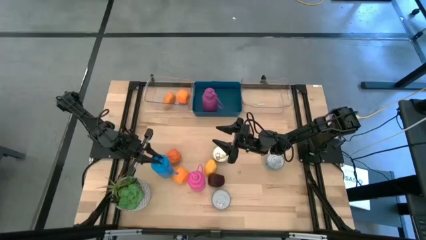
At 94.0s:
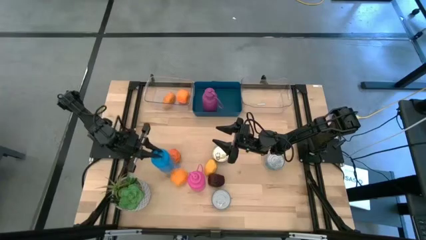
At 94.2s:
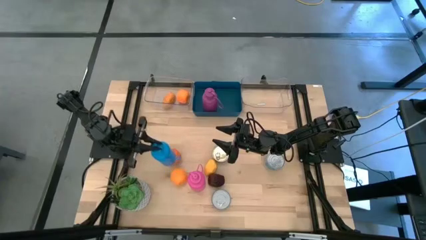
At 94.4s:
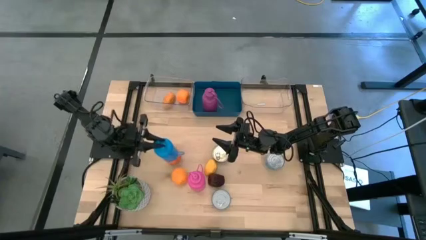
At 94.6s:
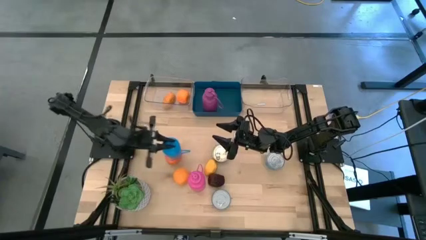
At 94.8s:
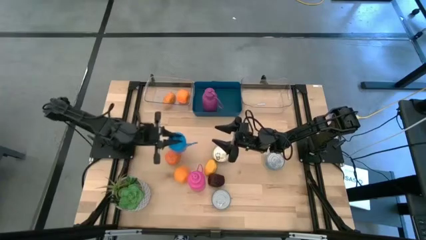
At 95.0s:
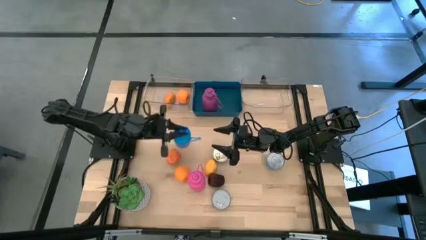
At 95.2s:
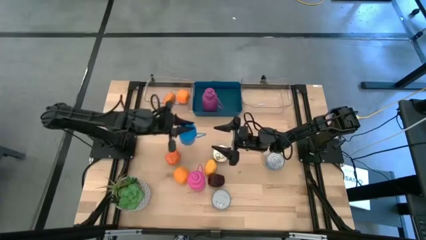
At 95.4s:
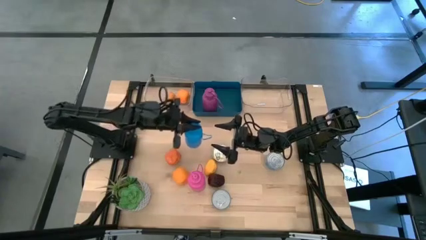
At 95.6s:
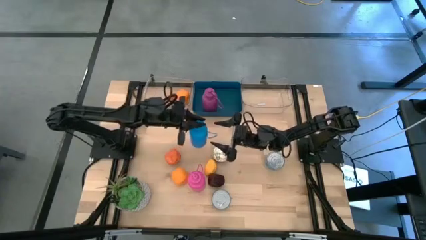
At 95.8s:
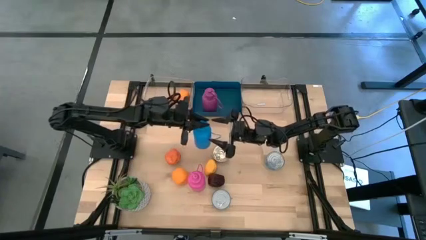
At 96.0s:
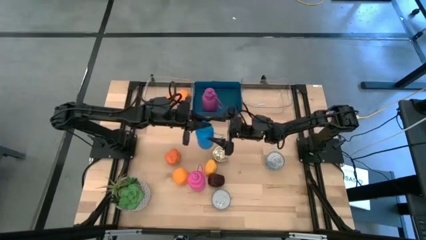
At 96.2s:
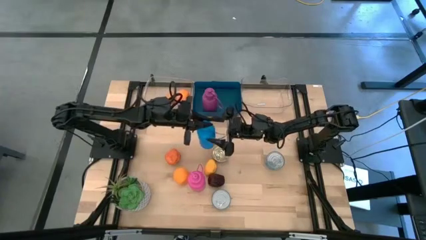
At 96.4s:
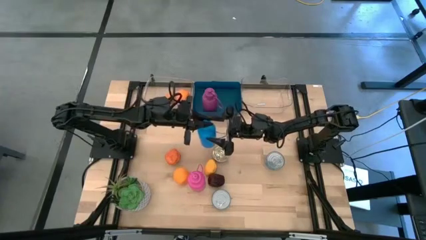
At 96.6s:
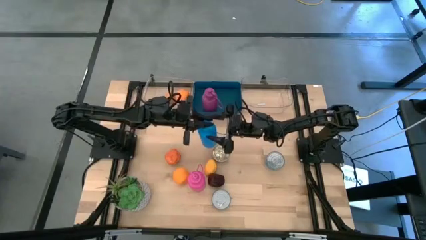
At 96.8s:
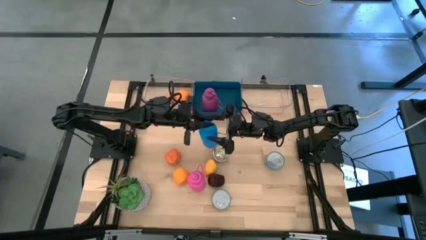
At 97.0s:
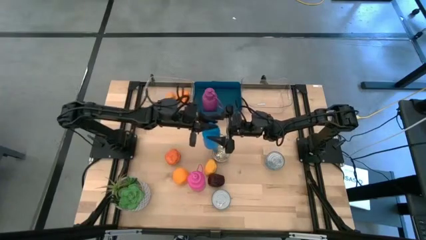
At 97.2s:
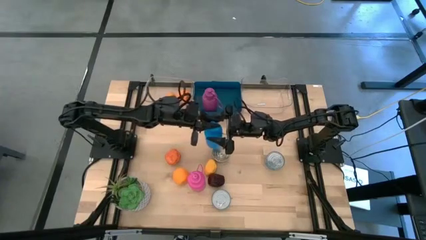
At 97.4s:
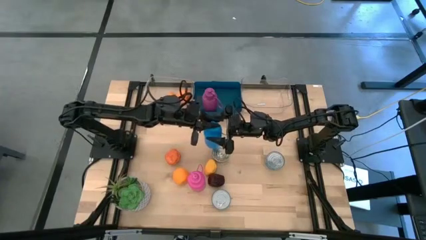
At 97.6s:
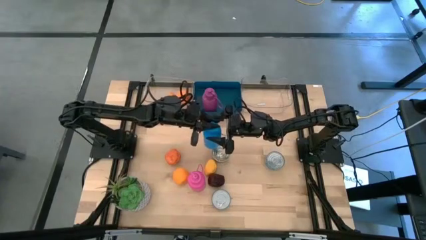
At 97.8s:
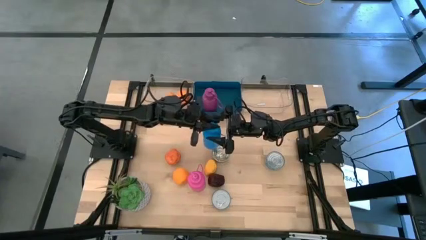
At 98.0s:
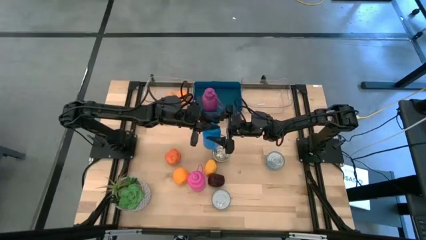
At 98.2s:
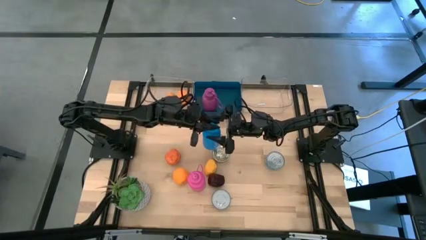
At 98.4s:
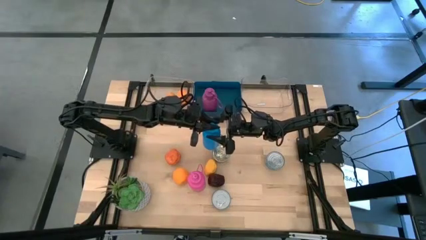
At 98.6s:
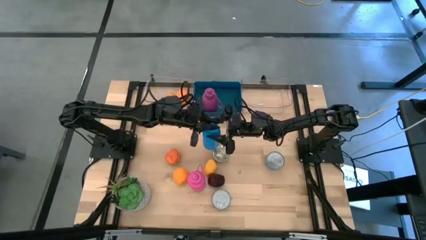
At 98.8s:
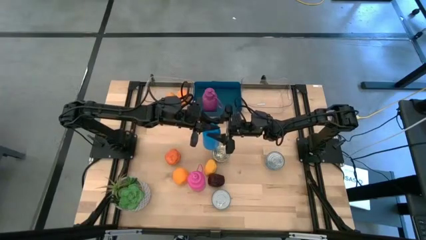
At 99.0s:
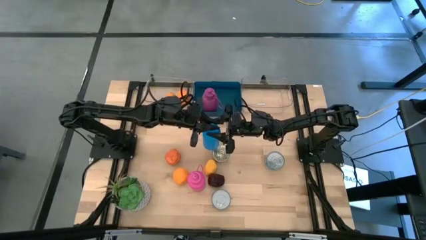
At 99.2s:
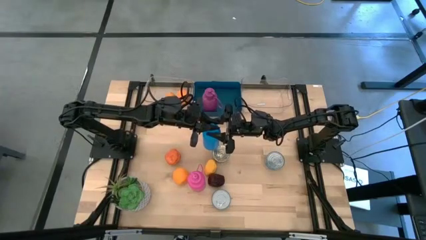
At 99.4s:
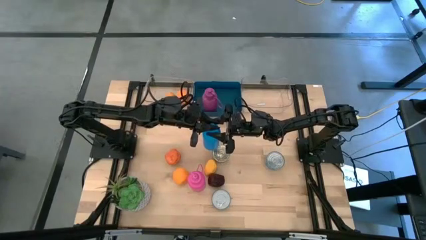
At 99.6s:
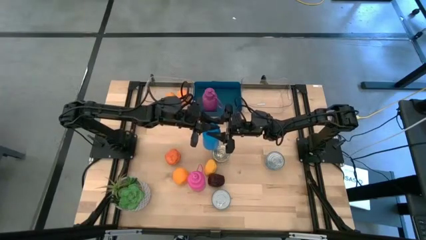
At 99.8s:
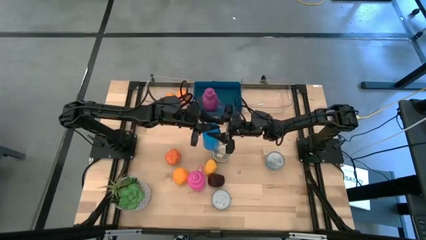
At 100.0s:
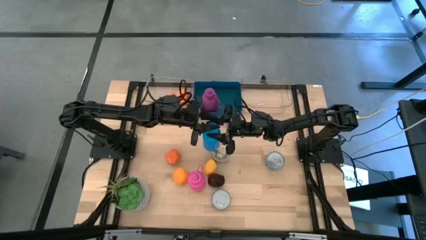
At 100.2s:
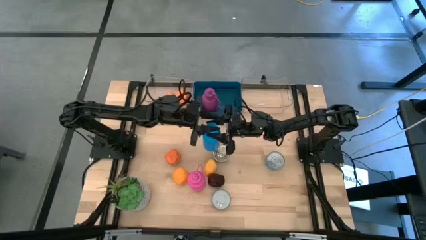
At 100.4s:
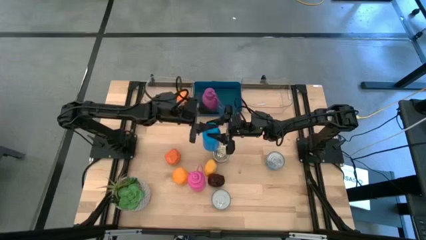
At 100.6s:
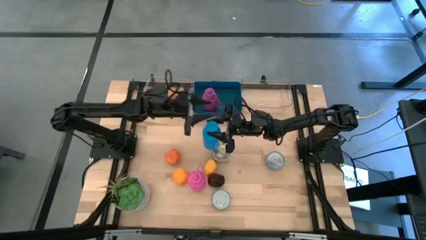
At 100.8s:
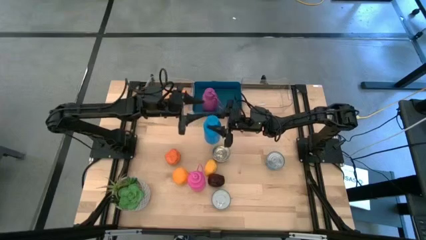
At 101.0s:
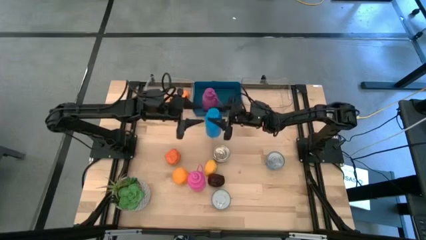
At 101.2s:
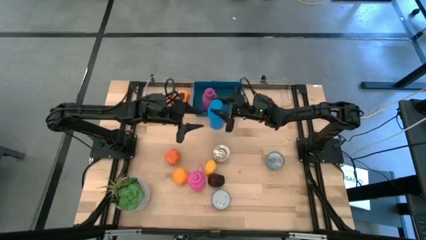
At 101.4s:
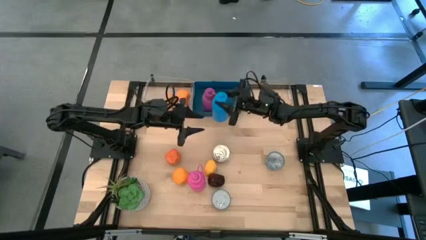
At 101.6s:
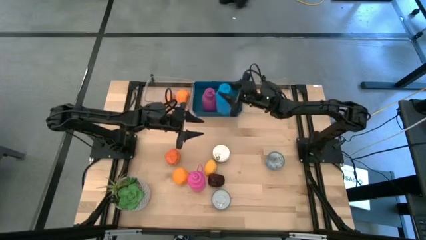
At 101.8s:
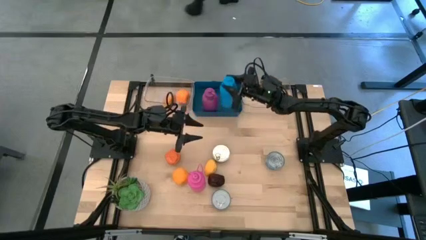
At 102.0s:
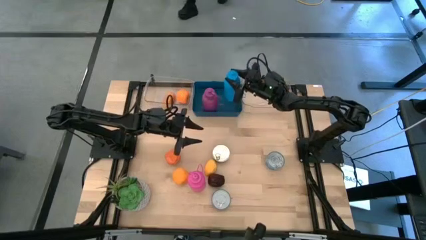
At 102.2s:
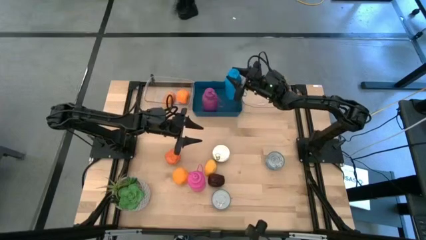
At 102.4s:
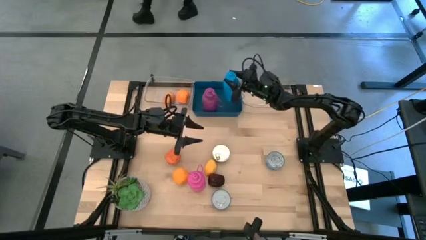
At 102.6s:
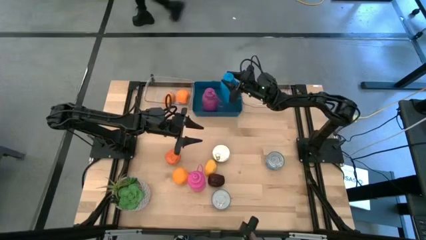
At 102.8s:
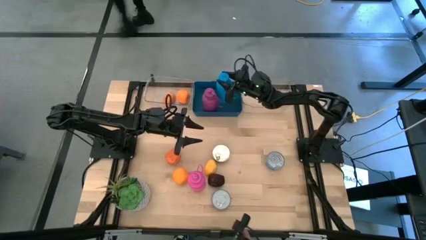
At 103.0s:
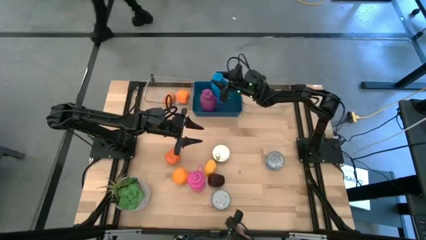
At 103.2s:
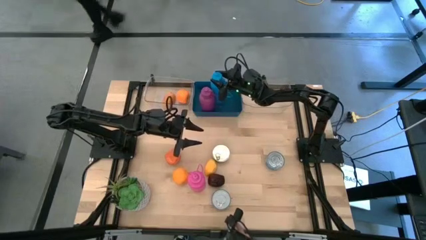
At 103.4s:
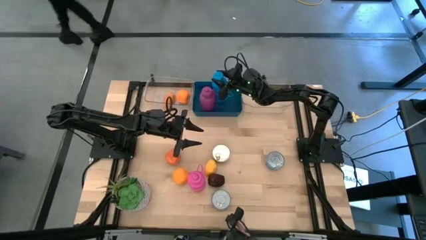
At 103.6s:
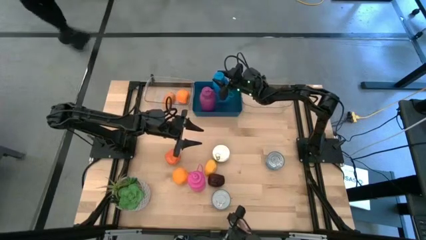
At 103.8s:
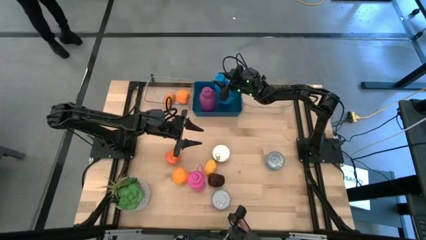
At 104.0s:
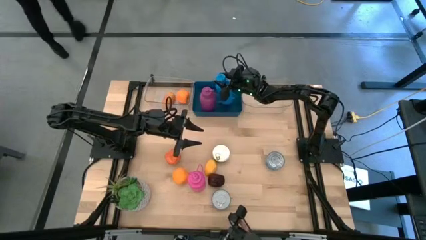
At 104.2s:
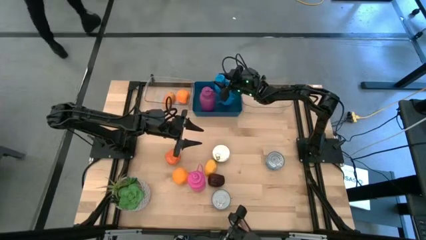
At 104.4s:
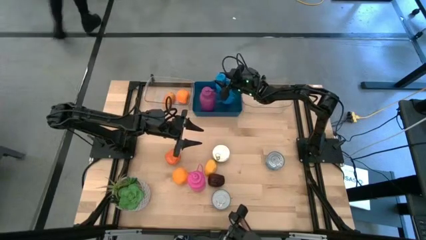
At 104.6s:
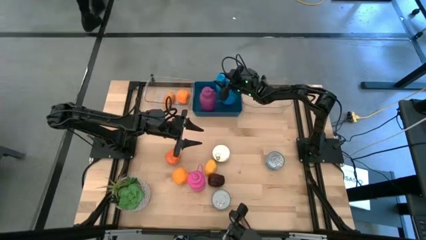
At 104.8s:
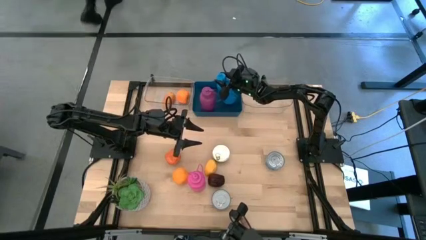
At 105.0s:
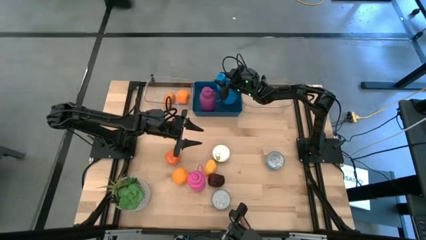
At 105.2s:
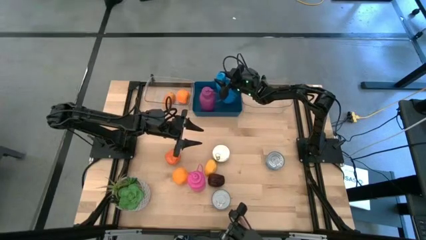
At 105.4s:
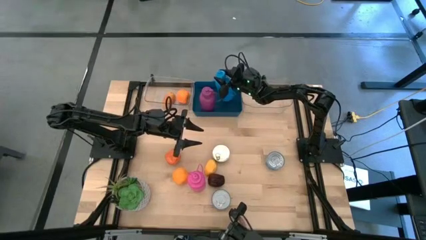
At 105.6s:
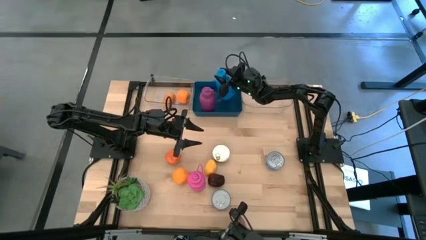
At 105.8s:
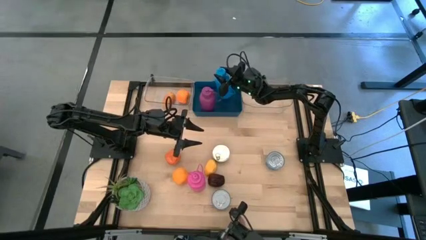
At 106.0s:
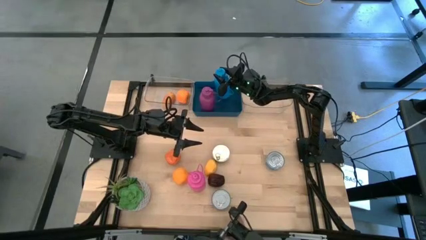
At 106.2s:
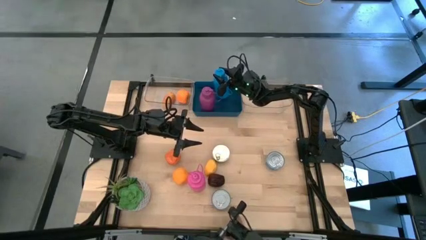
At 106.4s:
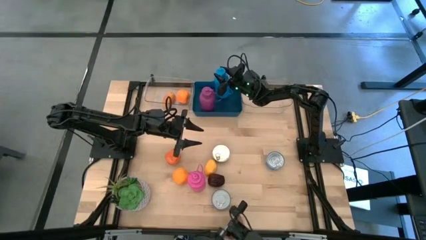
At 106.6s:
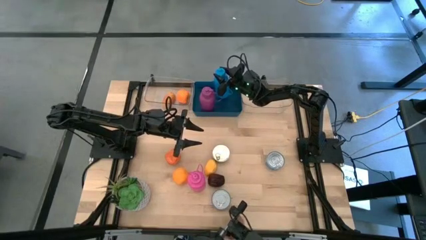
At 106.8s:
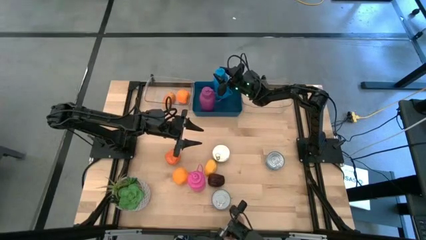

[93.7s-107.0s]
Task: Pick & Place Food Item
Put the blue water bottle into the blue bin

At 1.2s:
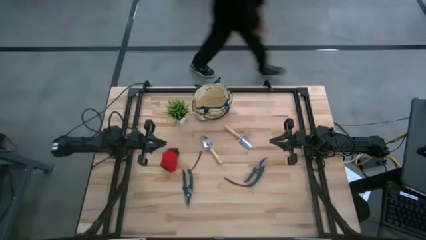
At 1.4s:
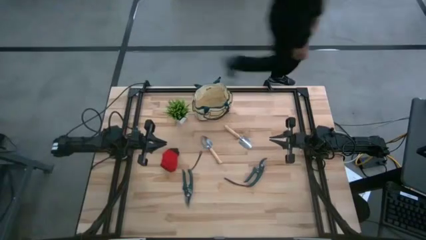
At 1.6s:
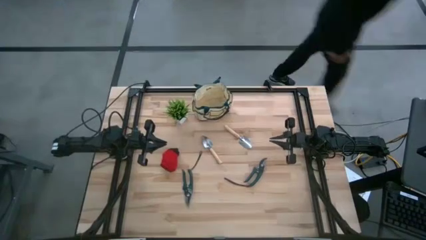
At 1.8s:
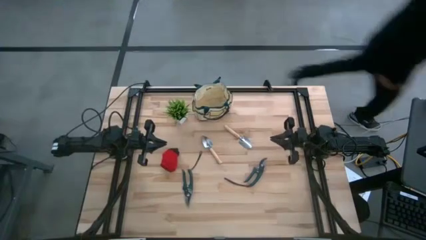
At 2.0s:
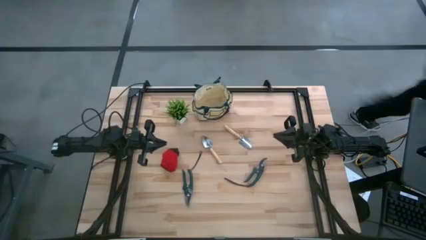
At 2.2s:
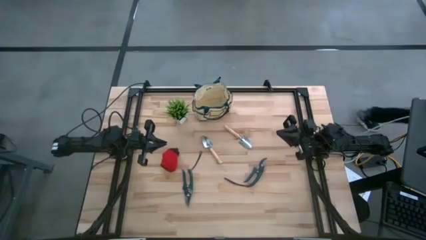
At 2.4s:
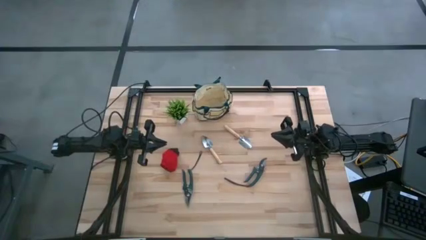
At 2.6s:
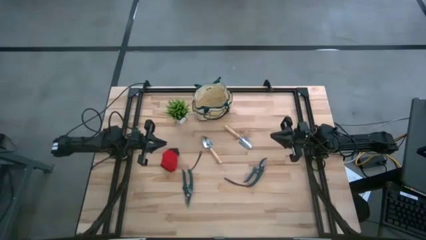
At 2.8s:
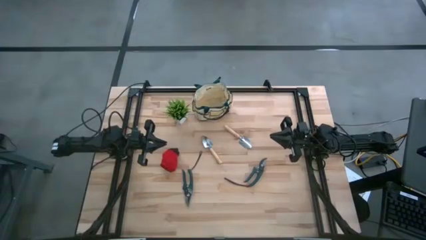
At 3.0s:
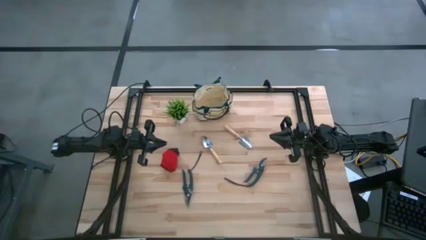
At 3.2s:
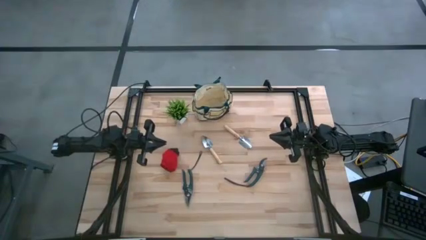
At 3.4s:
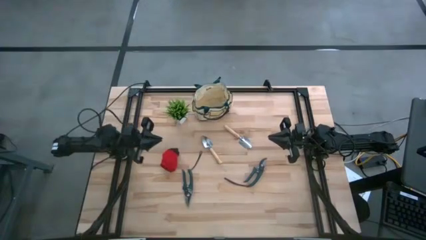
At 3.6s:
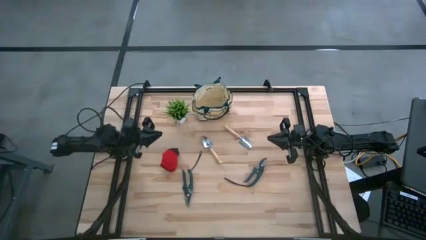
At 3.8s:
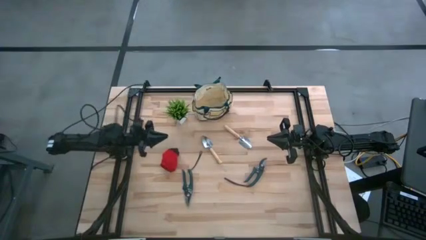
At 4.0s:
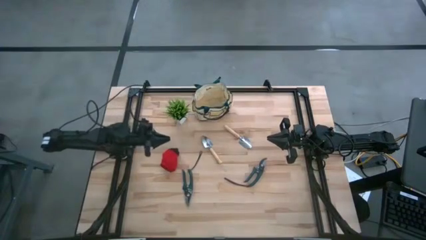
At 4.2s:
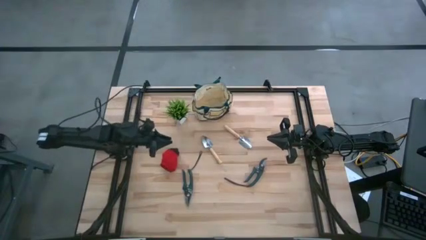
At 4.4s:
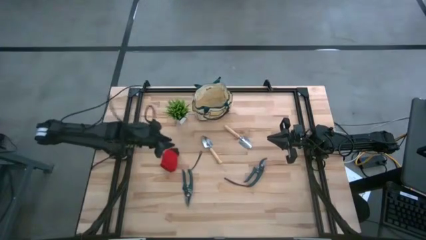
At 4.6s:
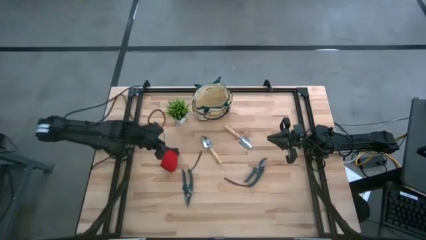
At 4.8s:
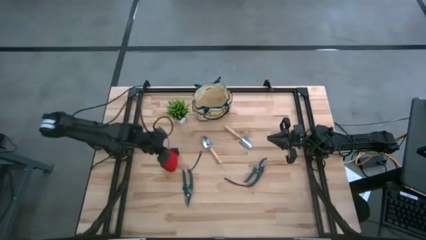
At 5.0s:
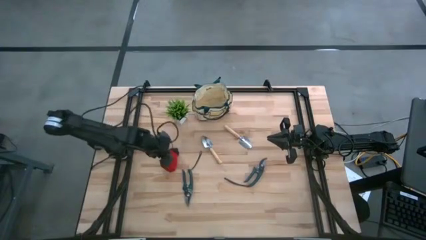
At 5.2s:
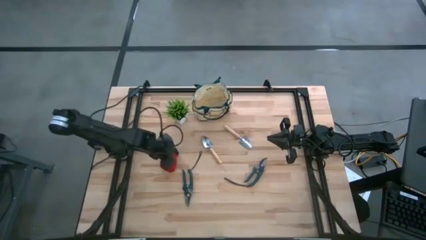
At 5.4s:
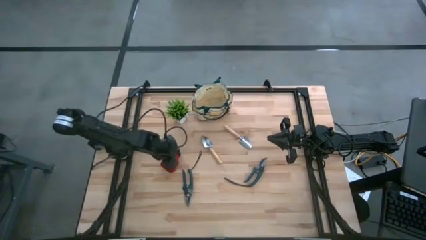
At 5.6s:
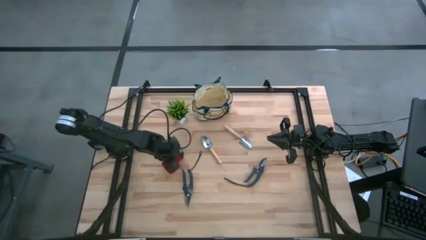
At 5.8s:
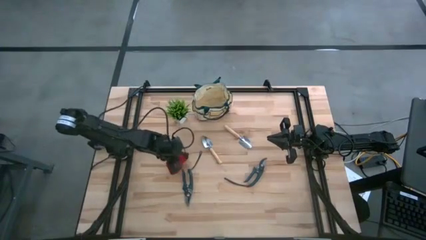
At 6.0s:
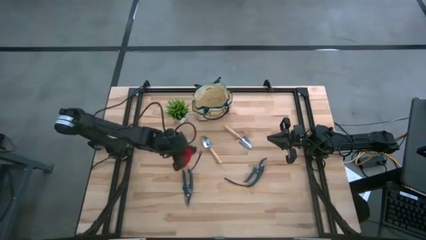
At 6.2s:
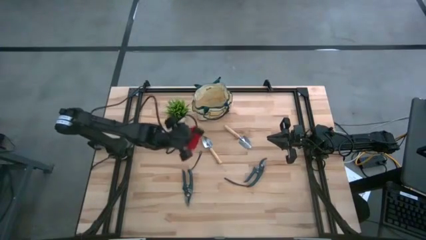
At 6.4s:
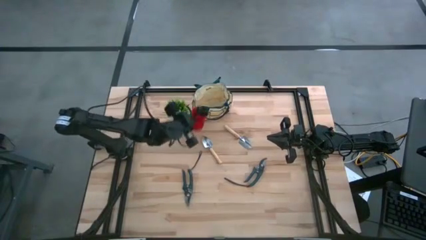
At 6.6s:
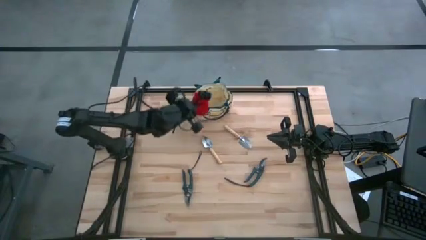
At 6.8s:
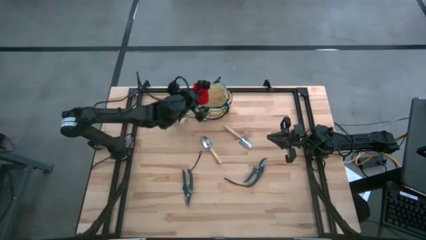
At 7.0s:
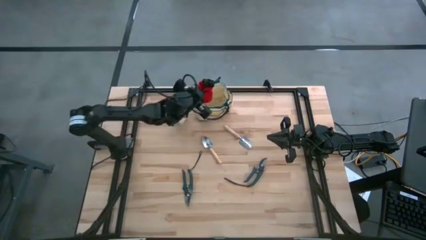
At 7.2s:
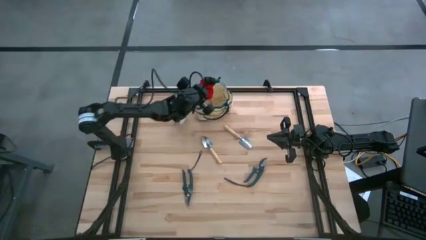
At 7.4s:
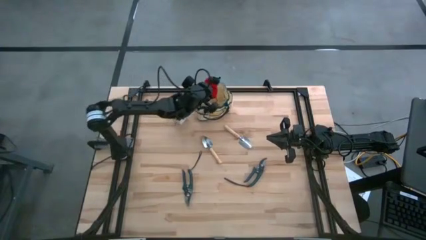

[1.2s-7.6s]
Task: Pick & Place Garden tools in Gardening bag
Put the red gloves into the white gardening bag
